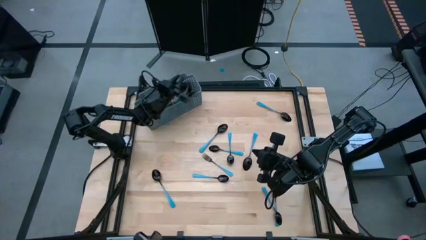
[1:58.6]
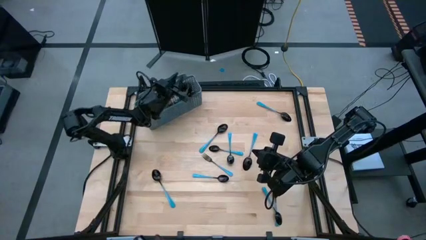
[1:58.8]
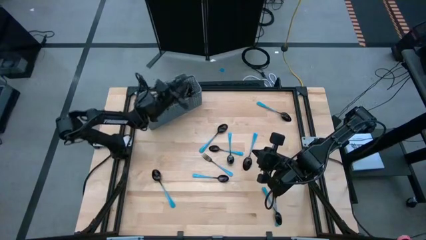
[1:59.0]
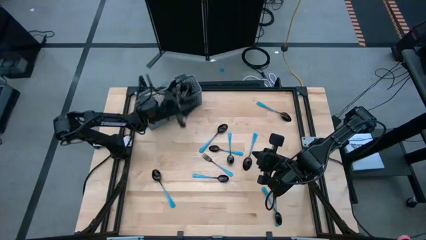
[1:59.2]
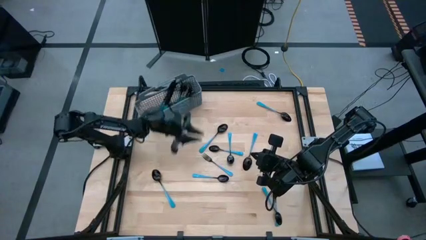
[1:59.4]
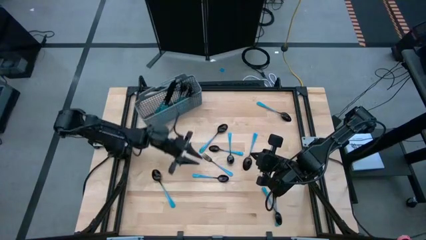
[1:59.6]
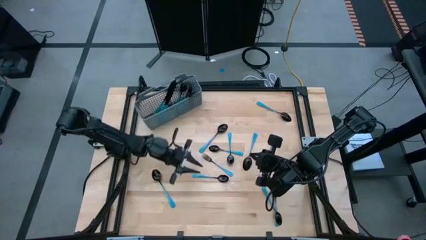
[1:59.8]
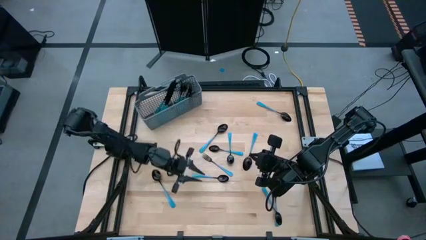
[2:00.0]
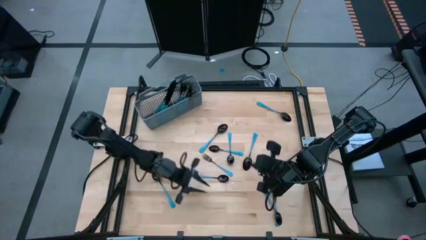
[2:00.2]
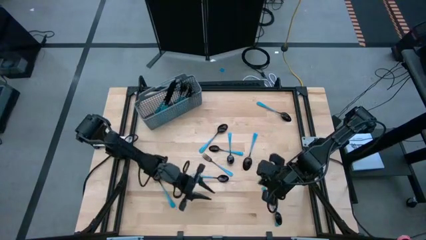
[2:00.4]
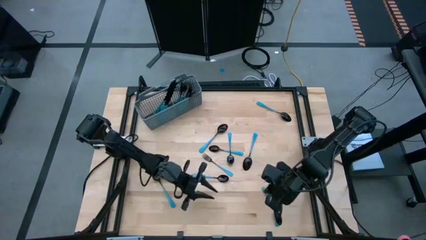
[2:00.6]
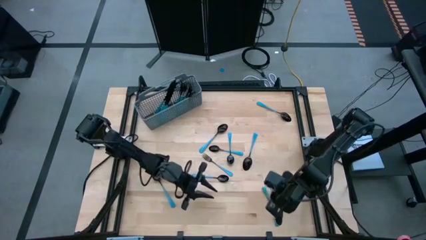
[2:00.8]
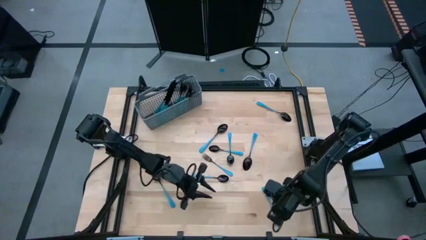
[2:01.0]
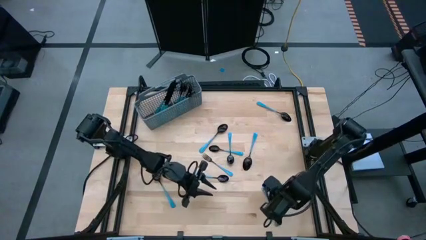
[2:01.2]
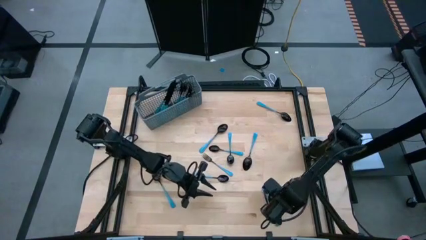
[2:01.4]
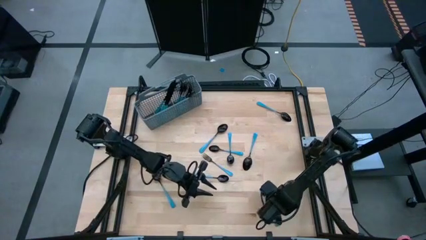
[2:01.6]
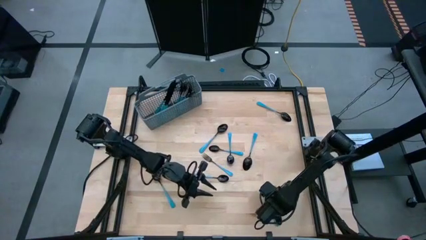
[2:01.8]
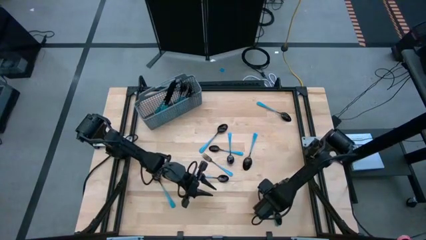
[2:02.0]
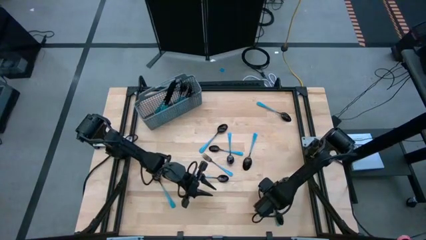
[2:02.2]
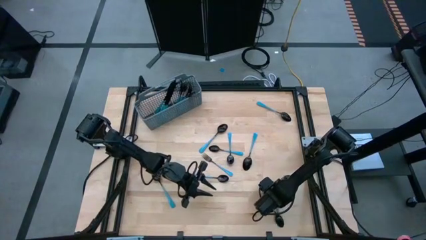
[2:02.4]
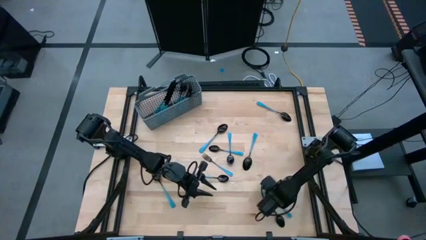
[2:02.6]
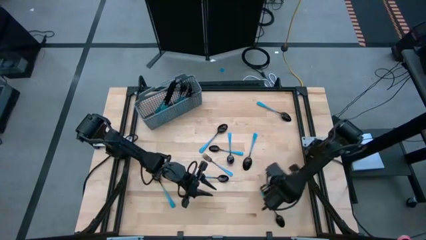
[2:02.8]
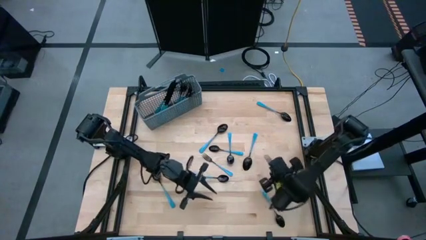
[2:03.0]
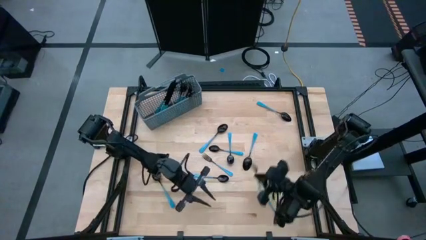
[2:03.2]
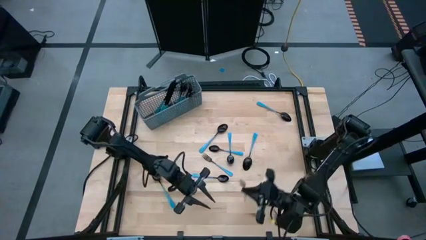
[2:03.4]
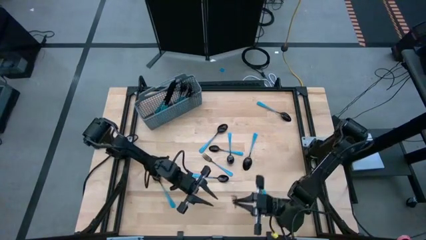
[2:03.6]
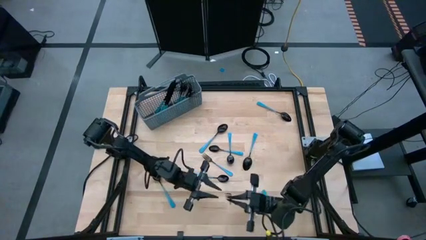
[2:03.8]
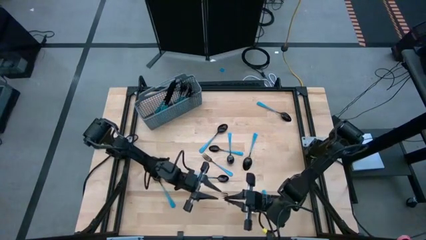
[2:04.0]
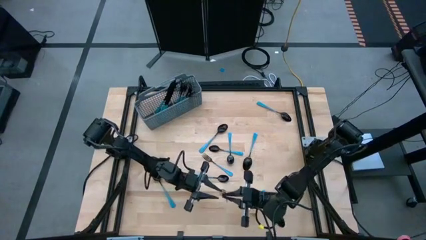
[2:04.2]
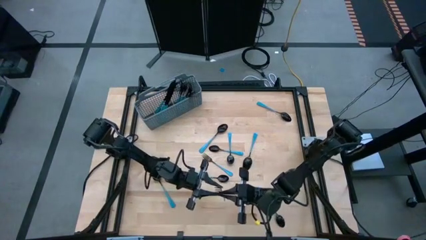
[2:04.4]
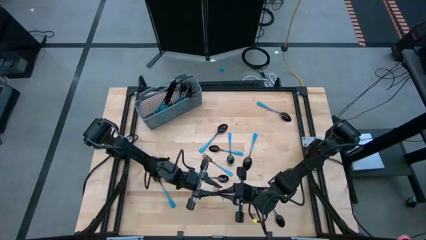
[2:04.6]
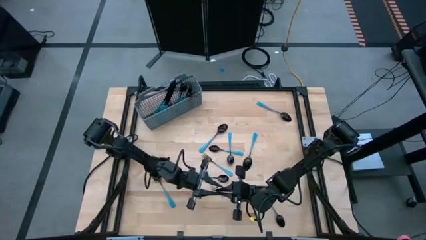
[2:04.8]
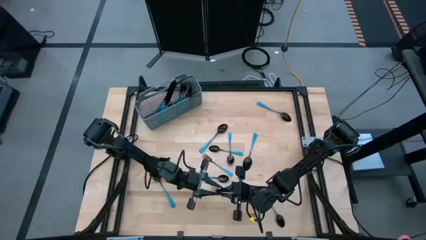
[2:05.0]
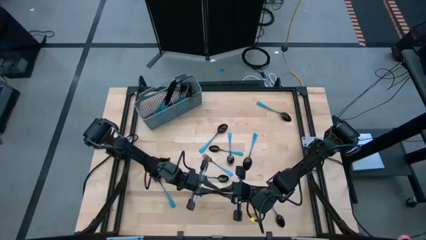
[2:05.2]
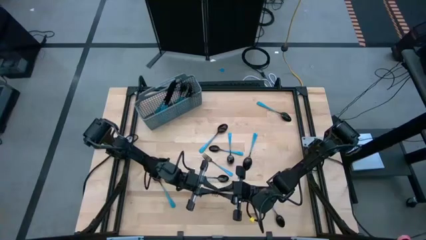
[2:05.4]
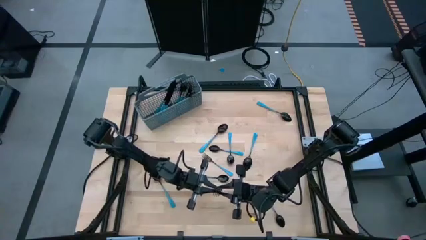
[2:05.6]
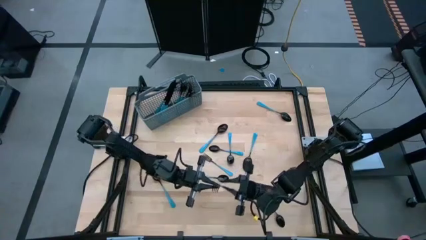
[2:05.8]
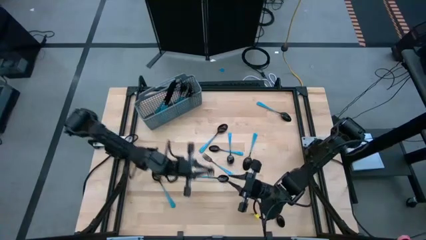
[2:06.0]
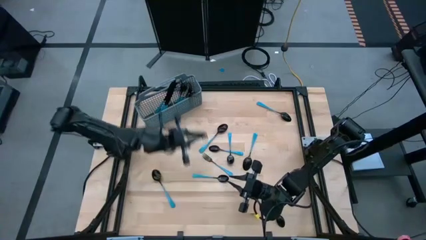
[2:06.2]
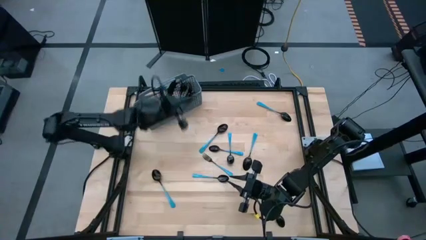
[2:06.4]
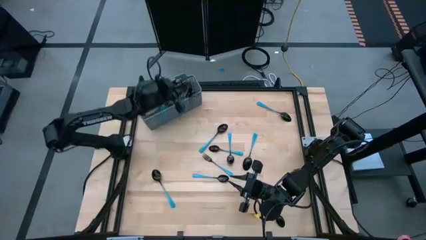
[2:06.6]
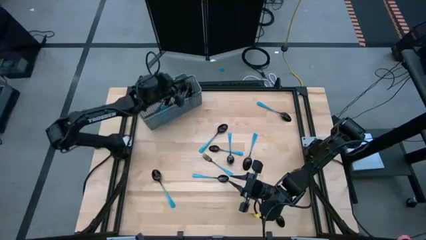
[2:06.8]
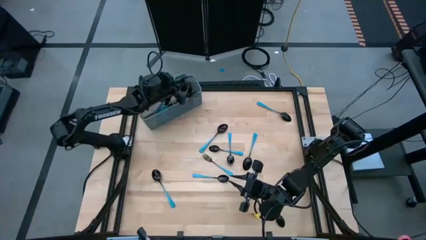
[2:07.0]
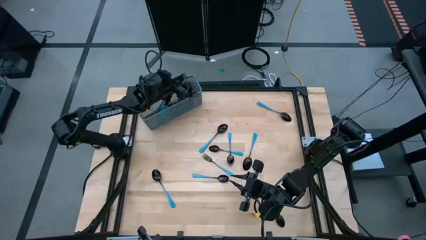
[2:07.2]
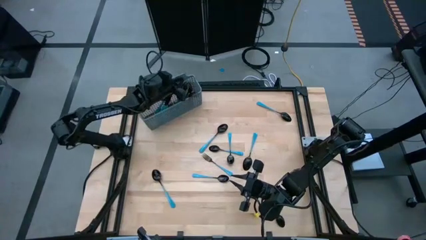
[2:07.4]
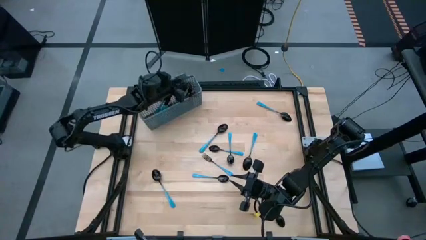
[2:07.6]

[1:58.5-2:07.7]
Task: Sort silverware
Put the blue fork in the silverware rack

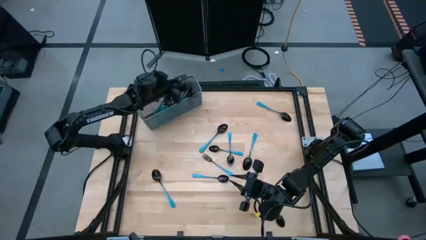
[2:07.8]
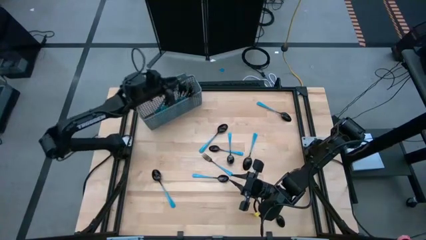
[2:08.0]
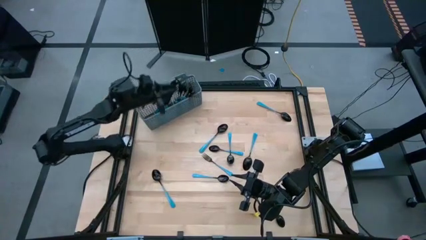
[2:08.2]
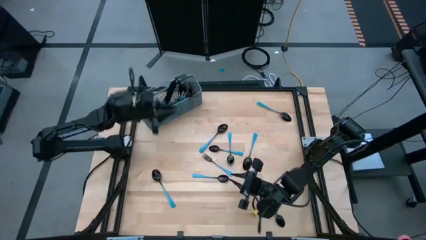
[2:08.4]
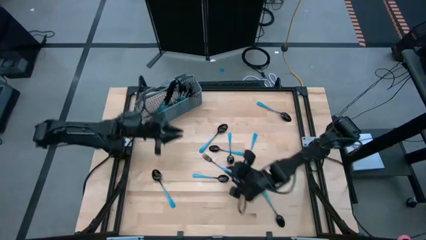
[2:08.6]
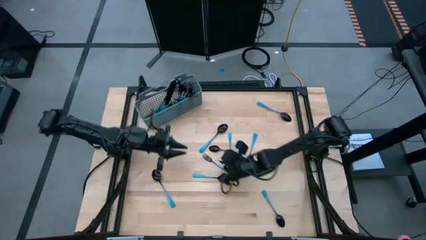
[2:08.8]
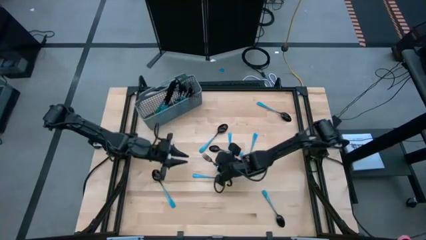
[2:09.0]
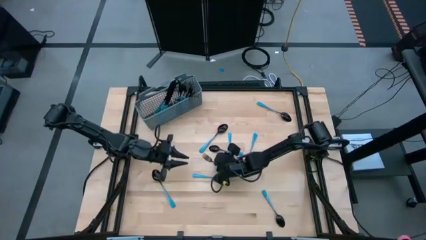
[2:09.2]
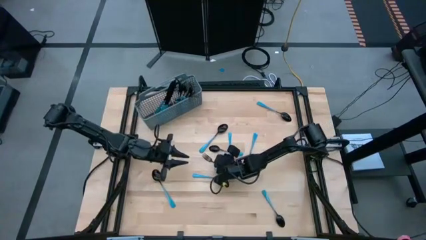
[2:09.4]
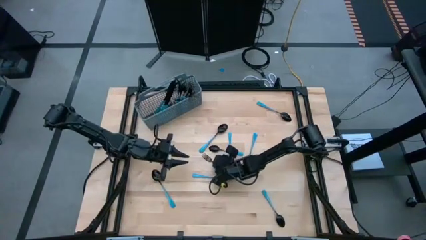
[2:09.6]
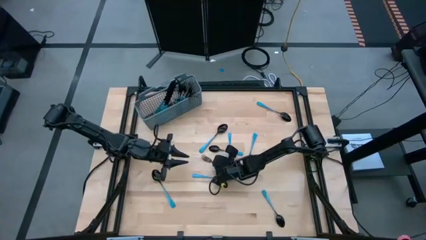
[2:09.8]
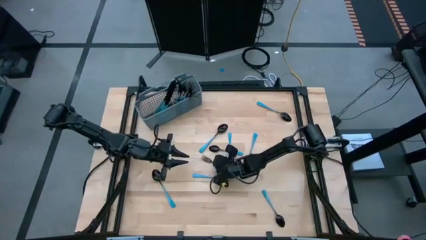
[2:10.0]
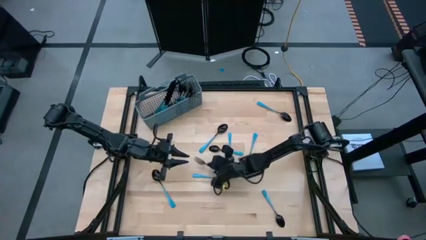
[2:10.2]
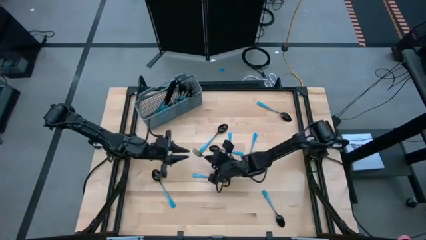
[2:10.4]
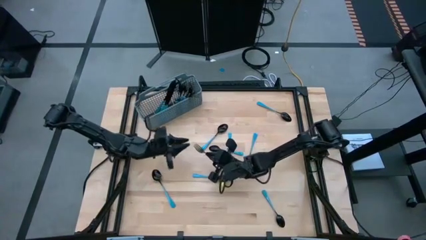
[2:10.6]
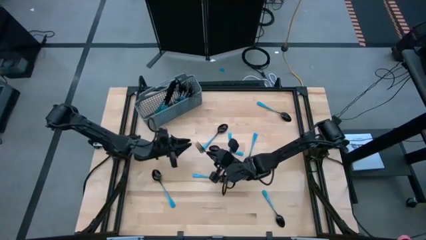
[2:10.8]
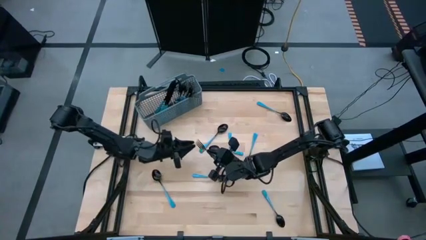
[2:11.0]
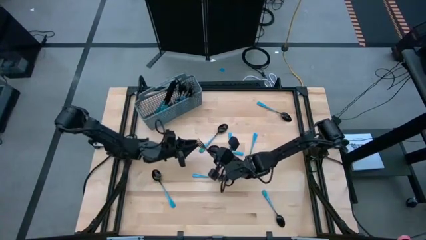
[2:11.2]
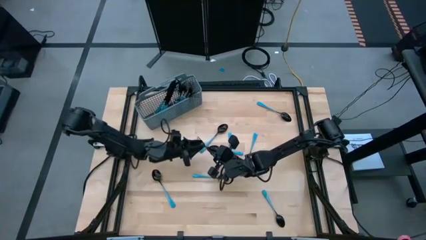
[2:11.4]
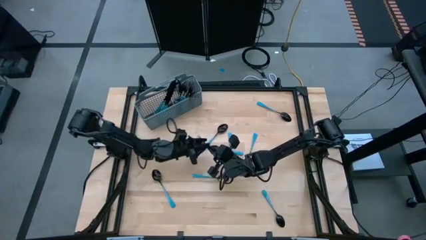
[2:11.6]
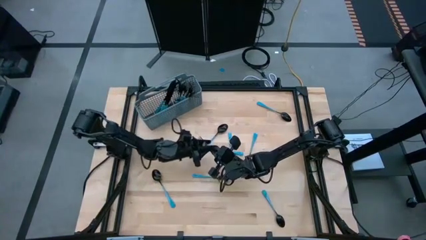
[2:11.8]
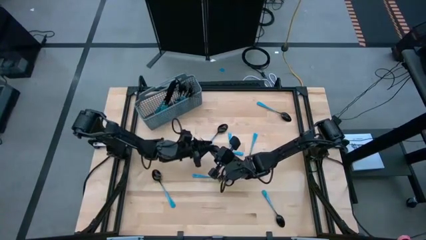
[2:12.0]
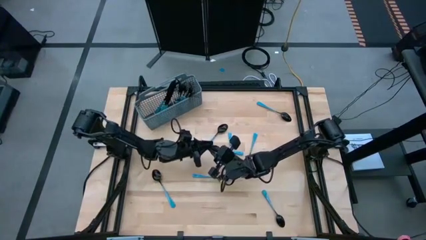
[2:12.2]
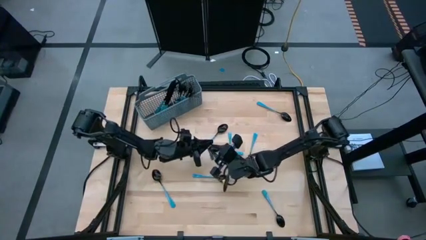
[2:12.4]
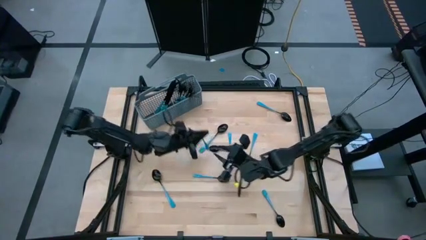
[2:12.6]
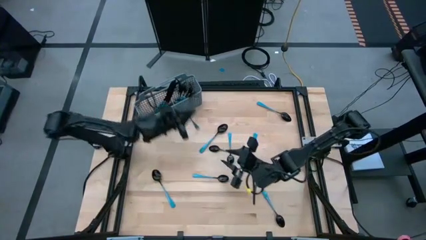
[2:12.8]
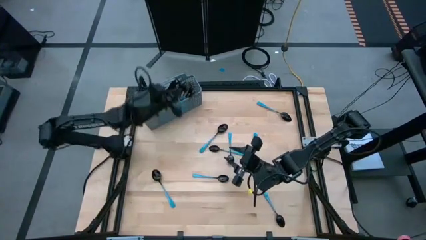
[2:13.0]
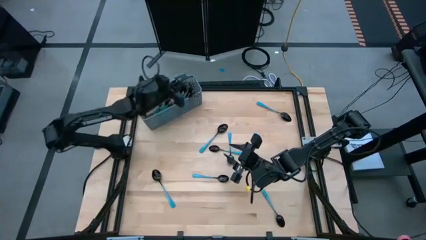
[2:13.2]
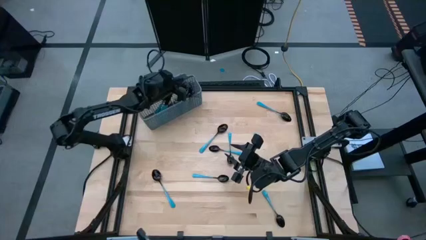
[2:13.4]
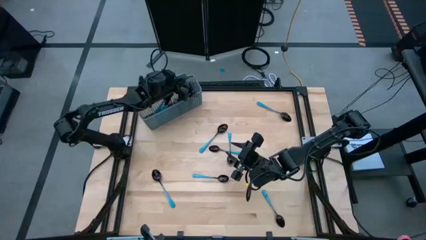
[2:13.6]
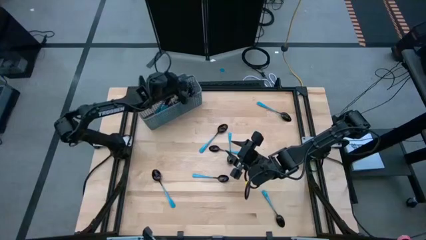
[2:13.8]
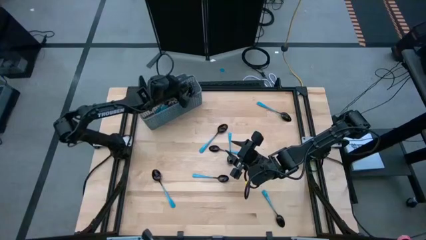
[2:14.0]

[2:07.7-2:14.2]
Put the blue fork in the silverware rack

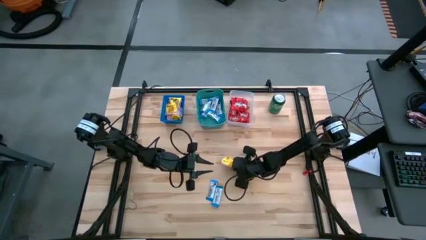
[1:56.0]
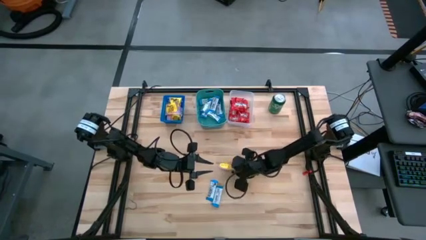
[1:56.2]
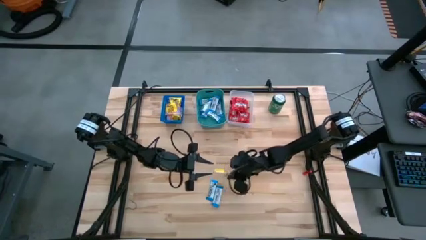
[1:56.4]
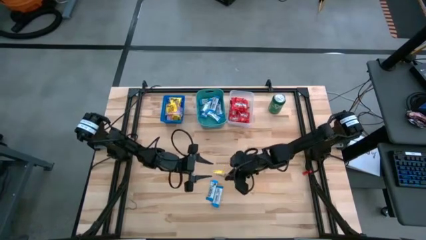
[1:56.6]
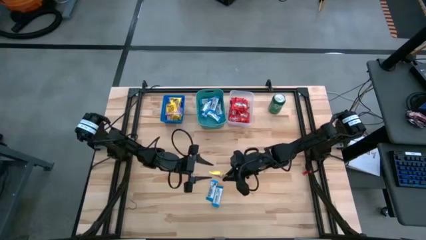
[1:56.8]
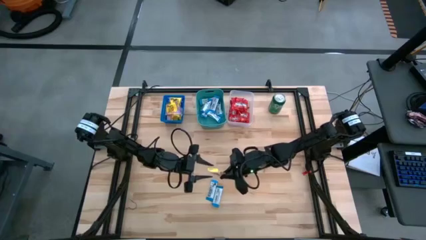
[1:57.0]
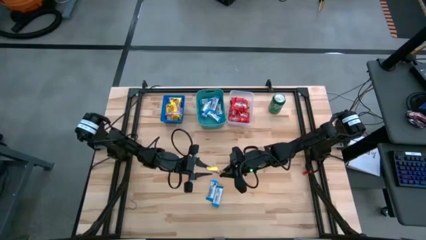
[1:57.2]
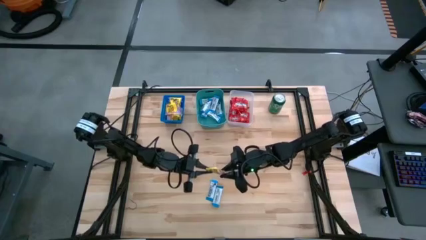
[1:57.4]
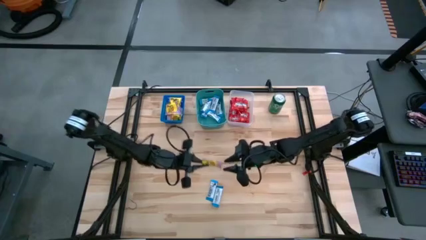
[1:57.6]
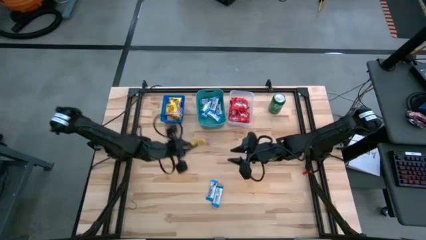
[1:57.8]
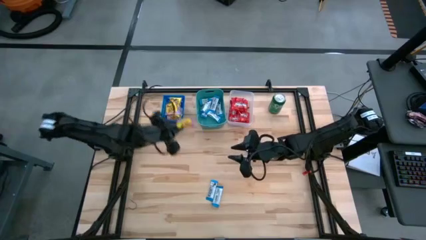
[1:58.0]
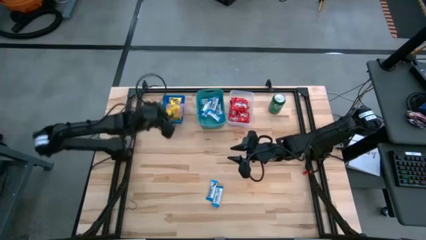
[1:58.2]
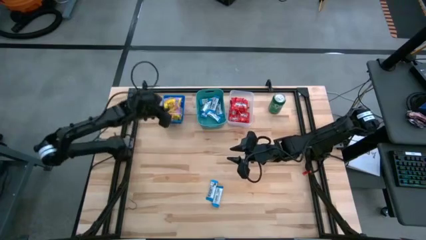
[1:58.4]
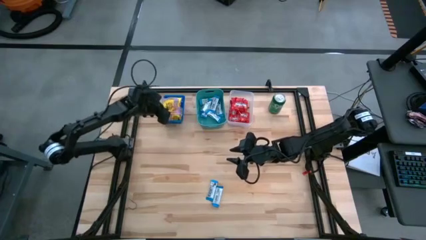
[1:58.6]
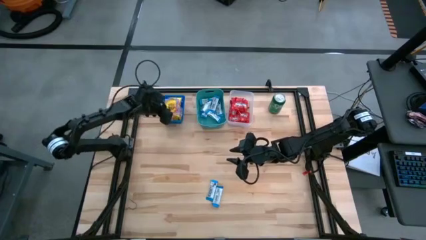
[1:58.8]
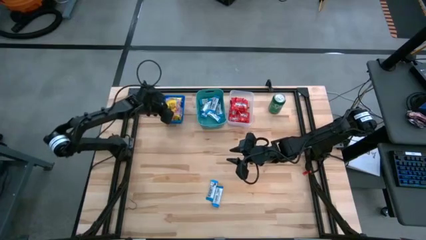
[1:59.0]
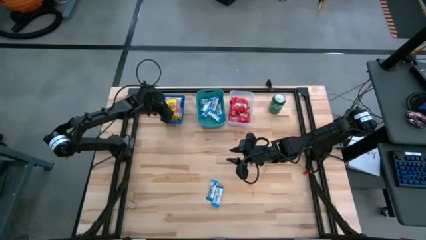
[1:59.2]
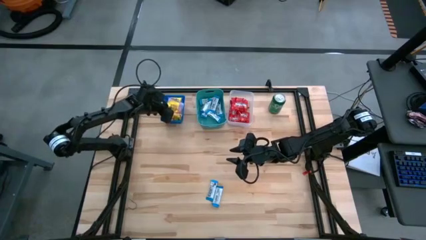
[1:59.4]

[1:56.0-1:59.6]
Task: Sort candy
Put the yellow candy into the blue bin
